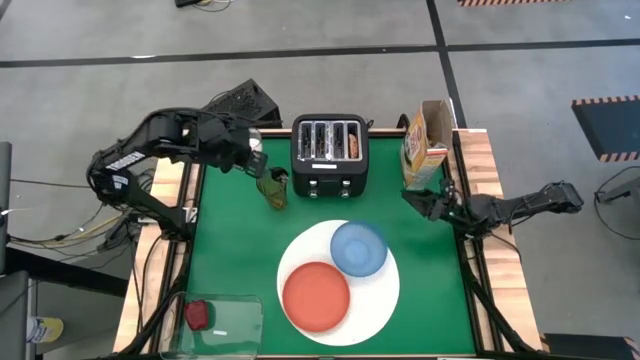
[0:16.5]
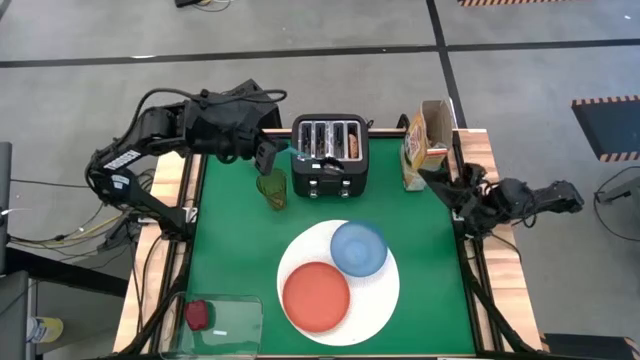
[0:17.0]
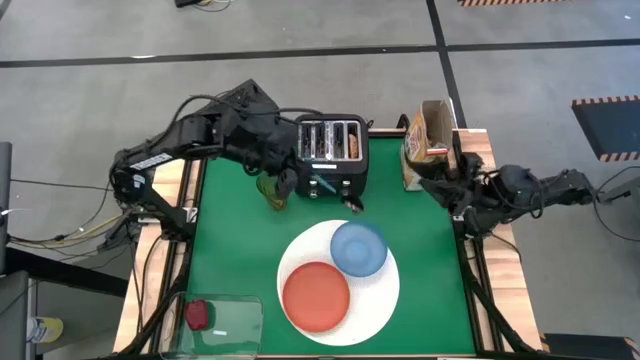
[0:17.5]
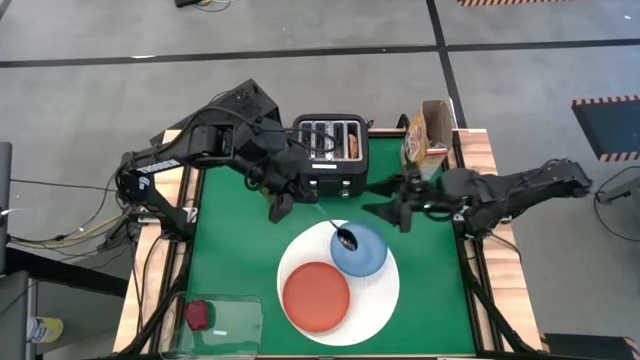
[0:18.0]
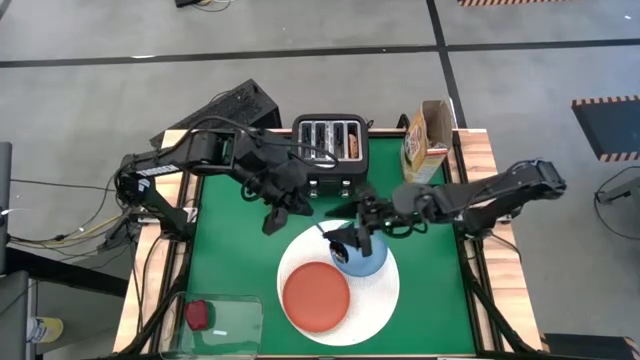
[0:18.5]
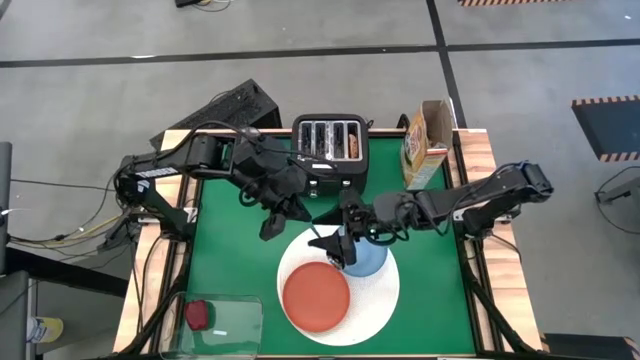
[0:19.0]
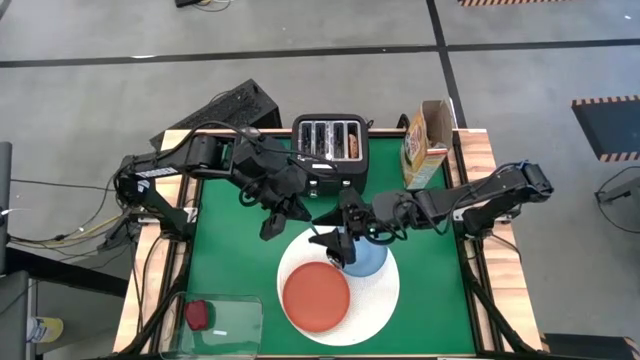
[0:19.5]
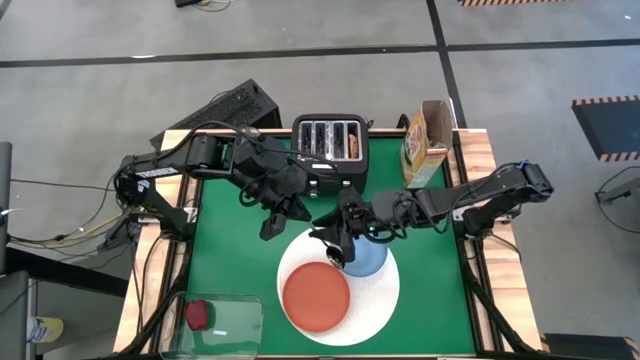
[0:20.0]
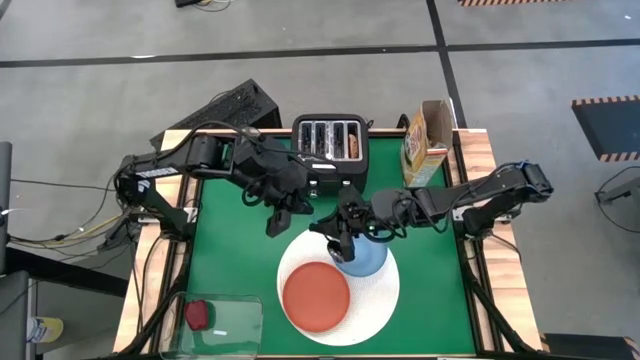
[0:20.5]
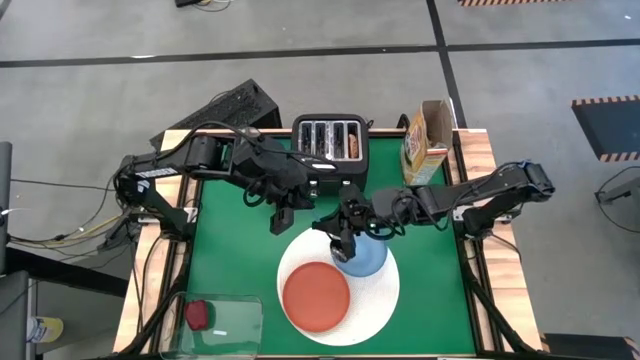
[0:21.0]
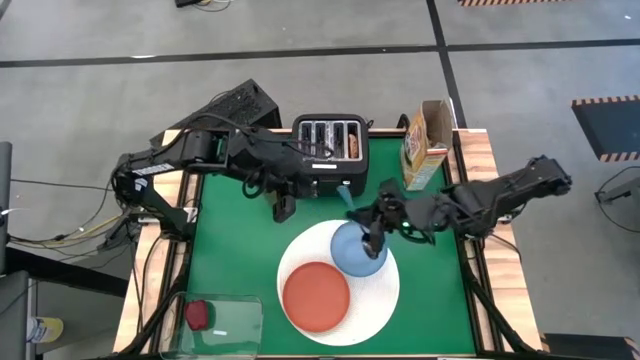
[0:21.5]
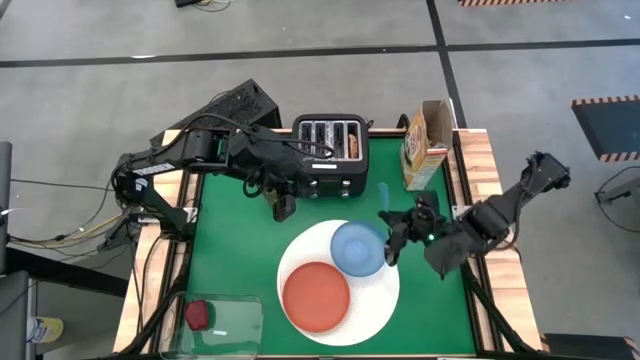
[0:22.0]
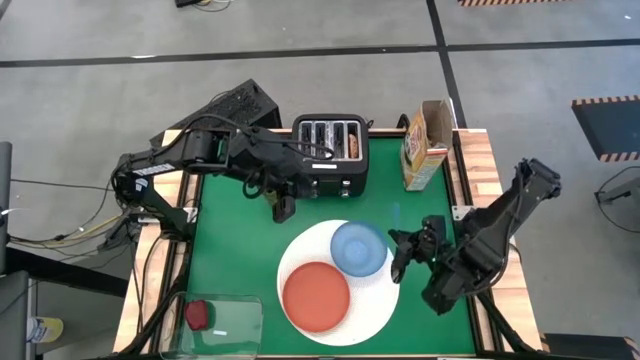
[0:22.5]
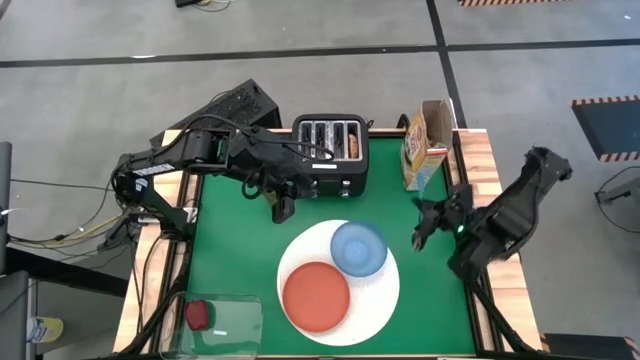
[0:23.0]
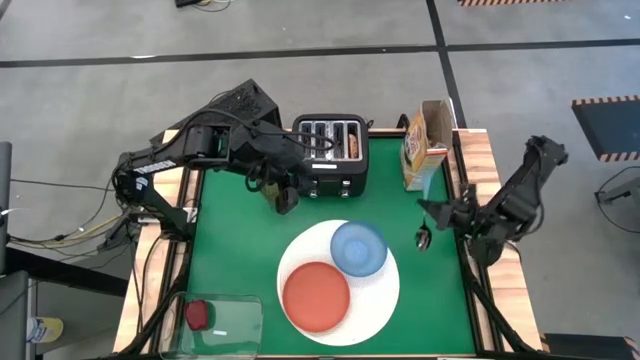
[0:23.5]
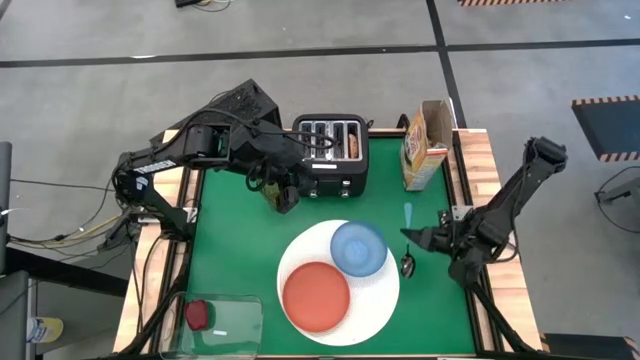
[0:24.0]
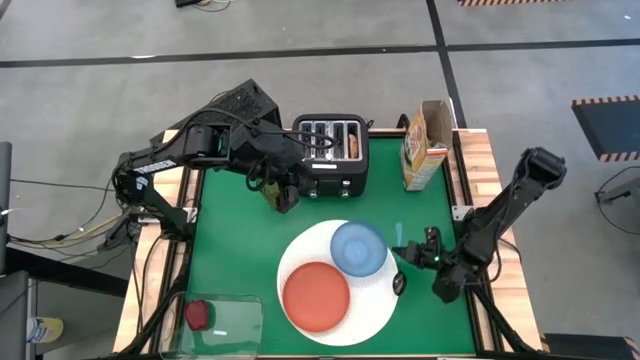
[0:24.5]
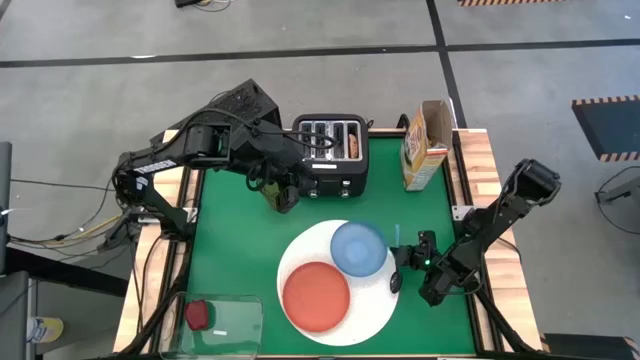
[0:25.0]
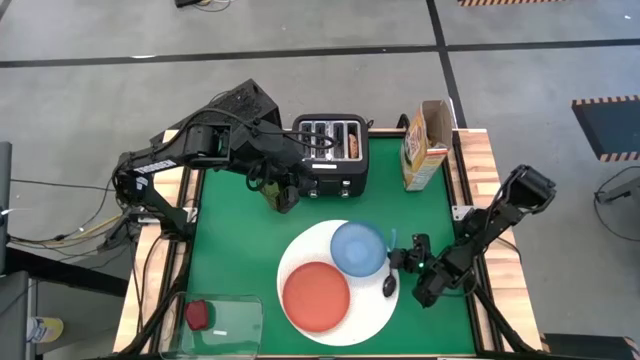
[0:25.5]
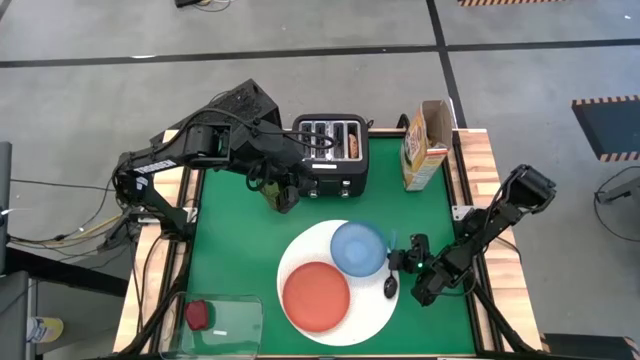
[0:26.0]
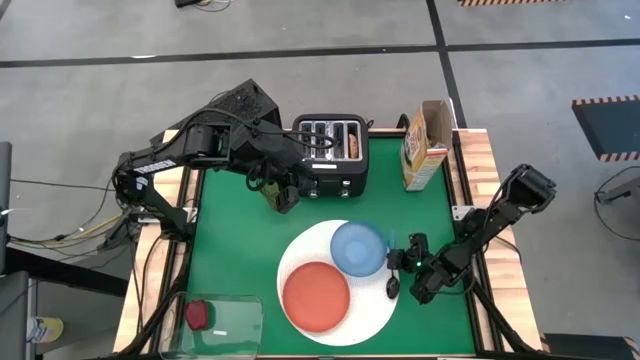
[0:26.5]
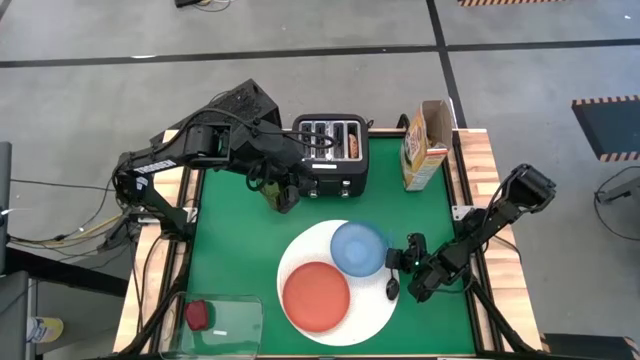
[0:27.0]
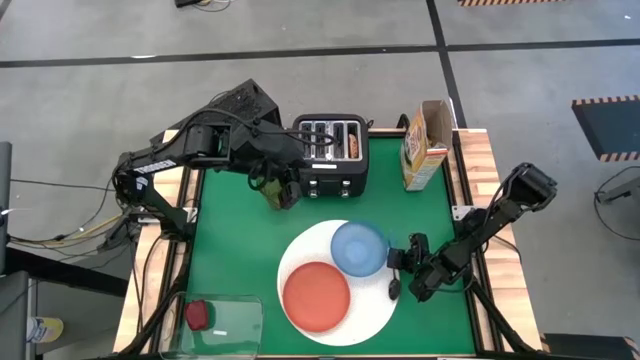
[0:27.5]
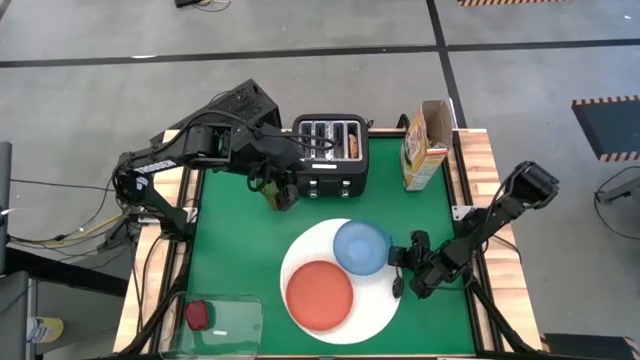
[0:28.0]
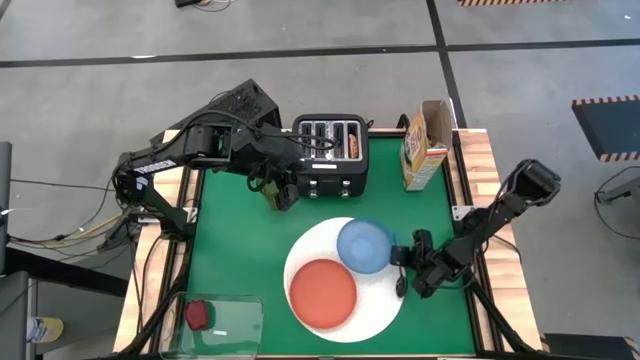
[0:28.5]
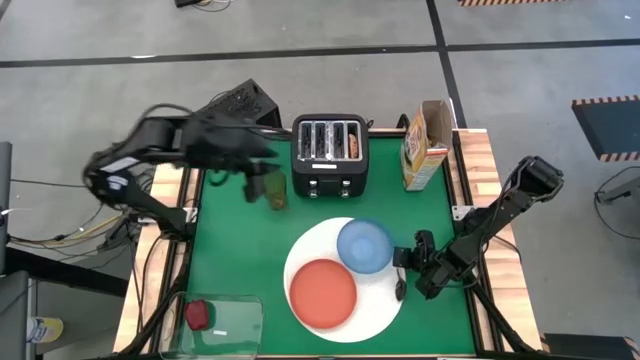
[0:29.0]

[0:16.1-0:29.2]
Task: Arrange a breakfast setting
Put the blue spoon on the white placemat to the right of the blue bowl

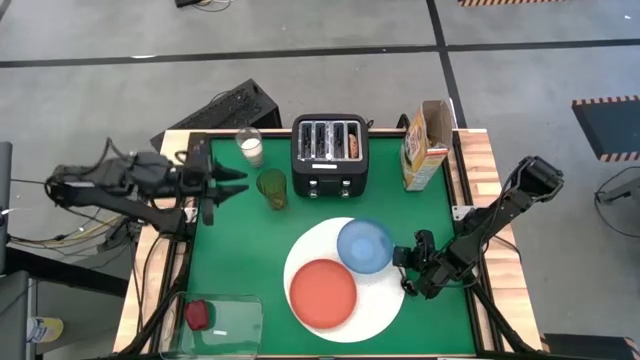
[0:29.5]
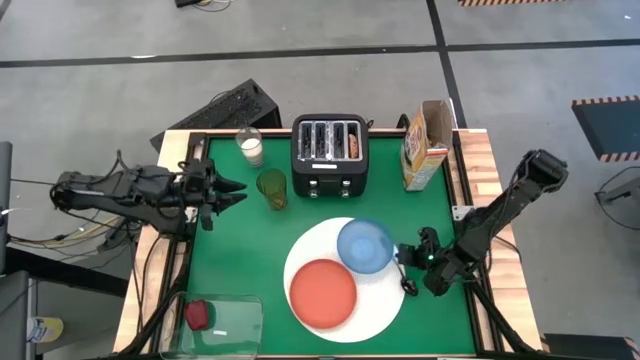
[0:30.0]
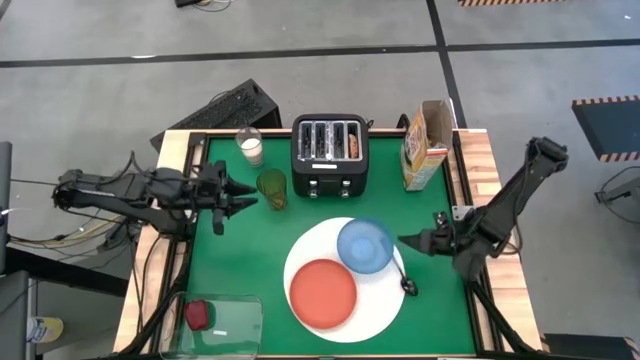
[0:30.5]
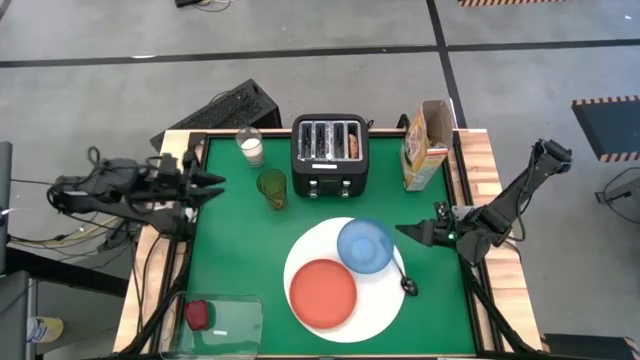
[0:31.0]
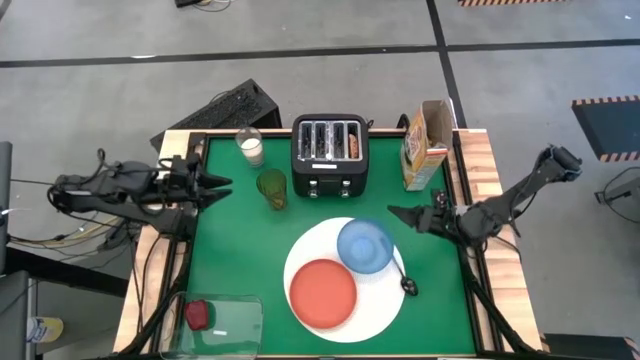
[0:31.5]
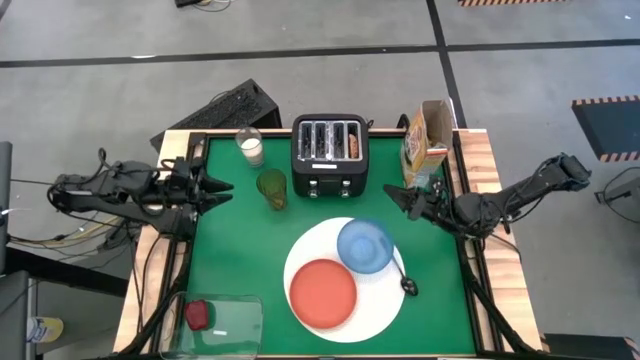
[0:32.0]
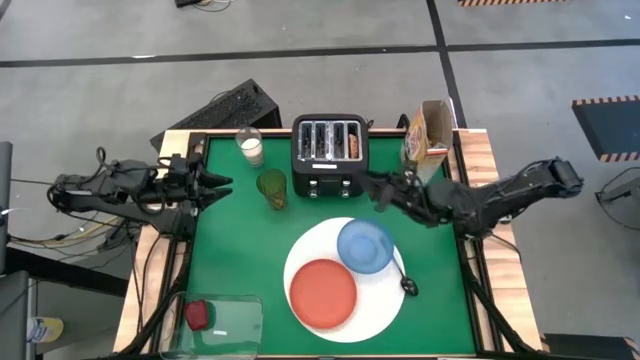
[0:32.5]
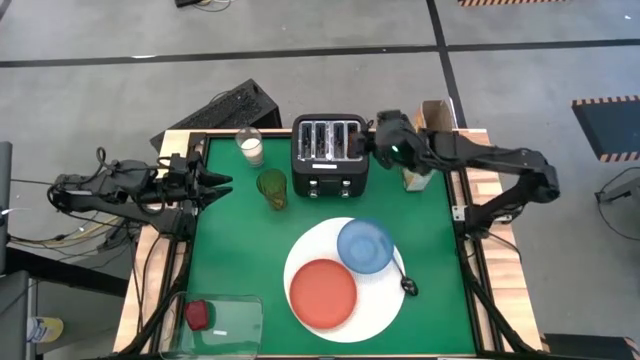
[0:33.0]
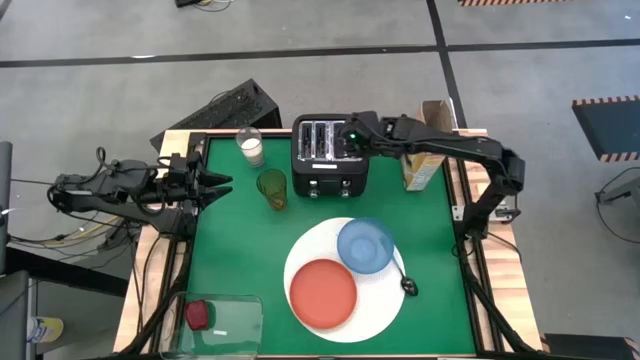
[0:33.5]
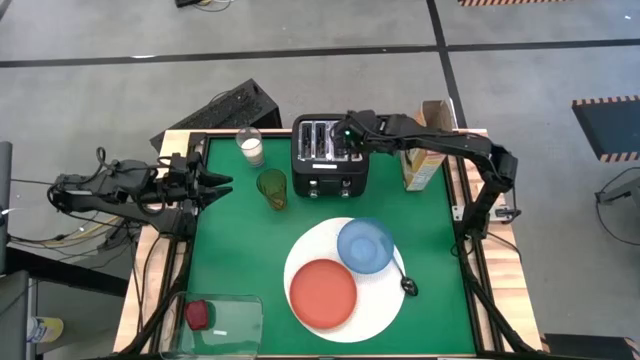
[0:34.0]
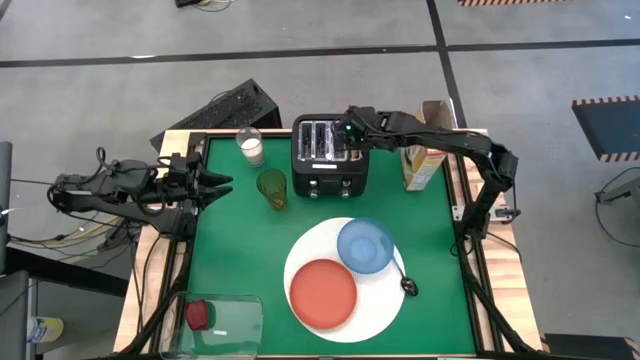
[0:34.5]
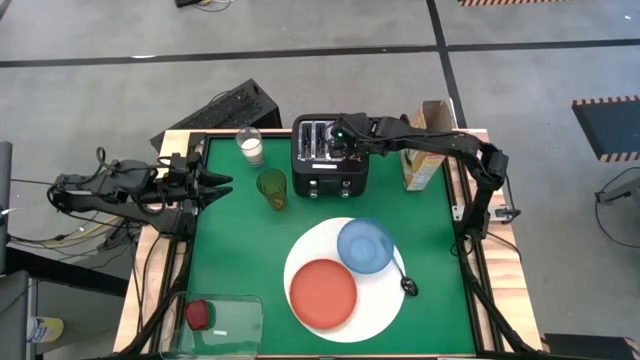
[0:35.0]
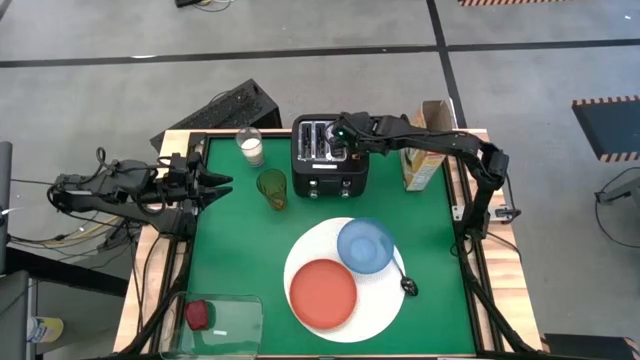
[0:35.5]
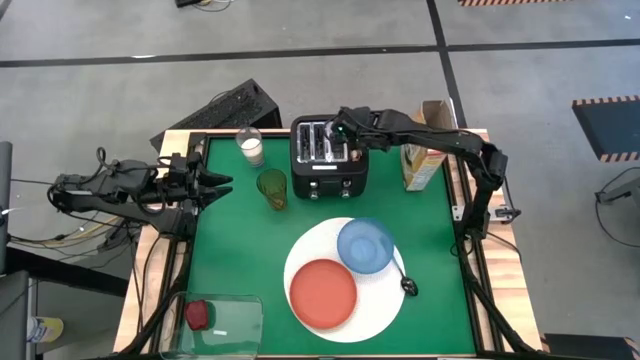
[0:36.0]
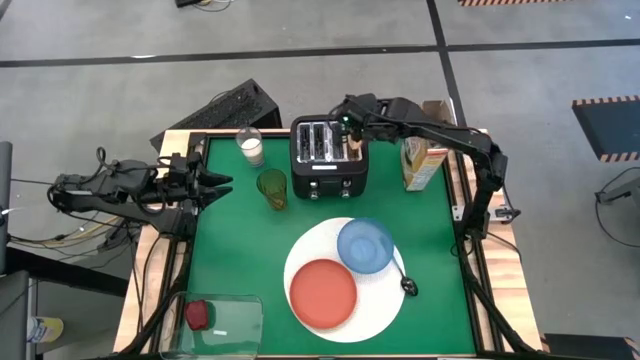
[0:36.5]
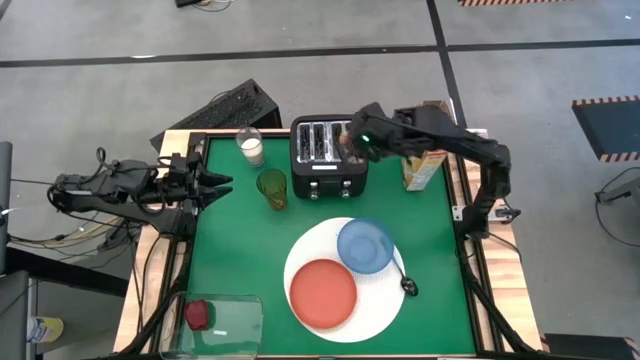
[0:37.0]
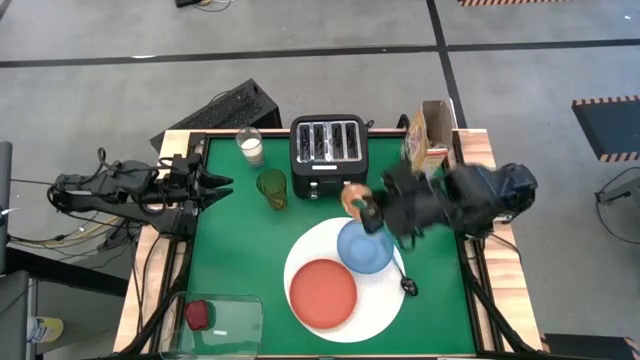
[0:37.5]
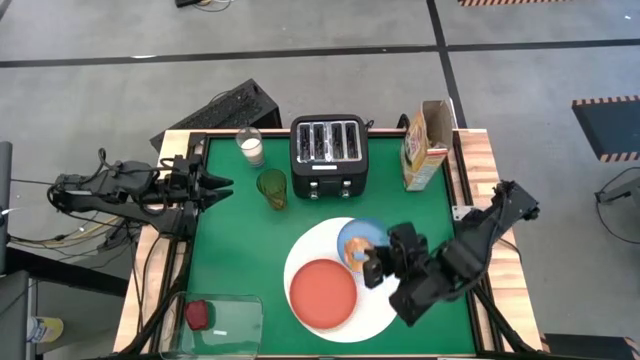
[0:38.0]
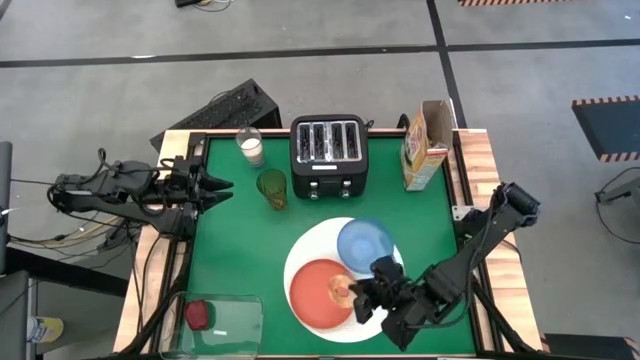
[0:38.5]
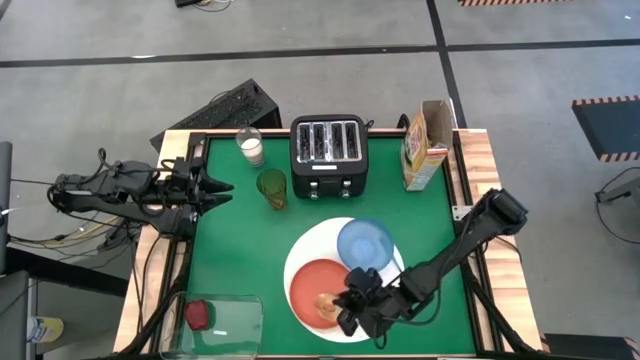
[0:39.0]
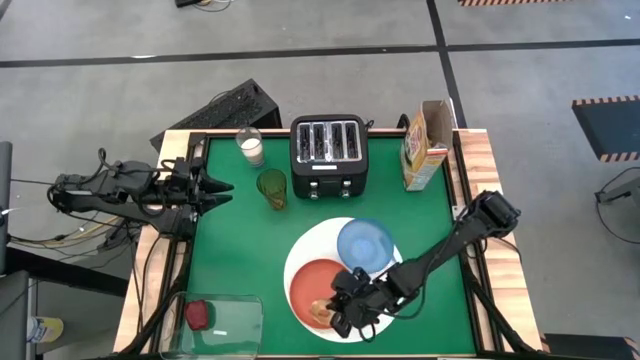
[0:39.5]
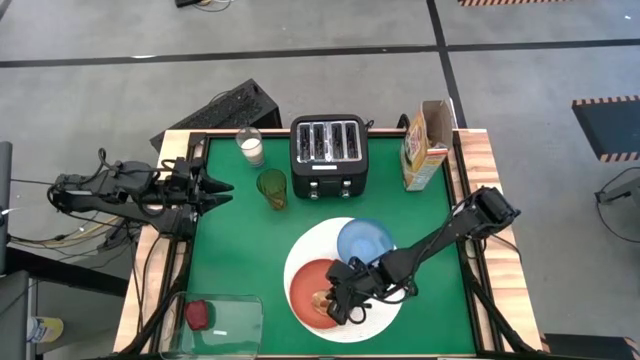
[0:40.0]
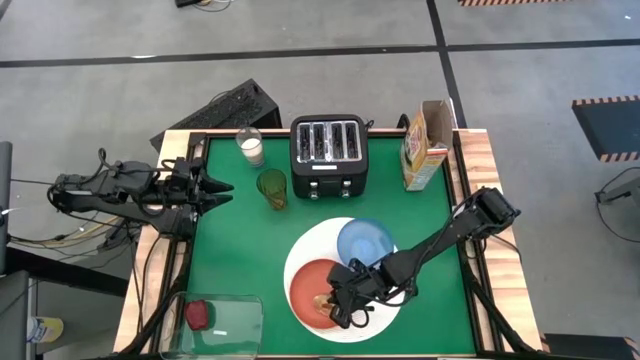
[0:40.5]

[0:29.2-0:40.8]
Put the bagel from the toaster onto the orange plate
